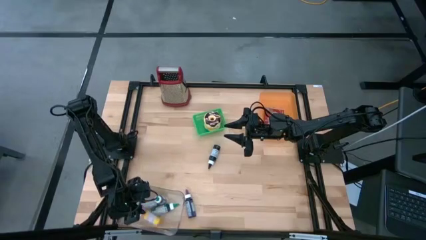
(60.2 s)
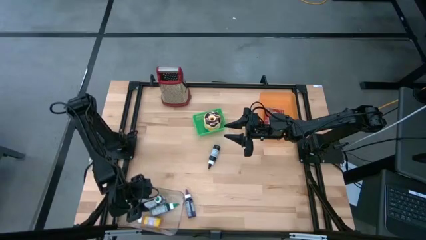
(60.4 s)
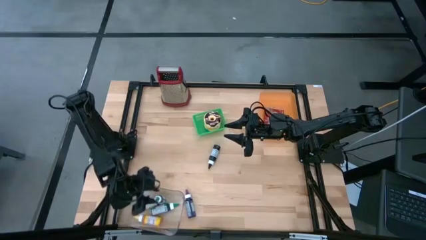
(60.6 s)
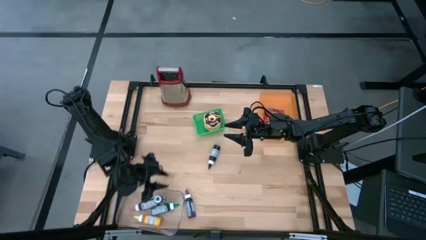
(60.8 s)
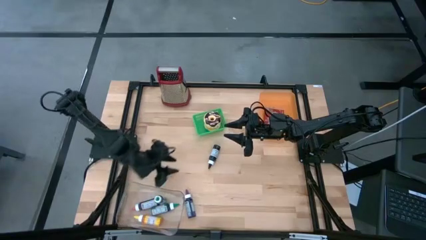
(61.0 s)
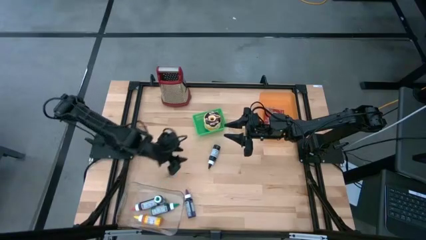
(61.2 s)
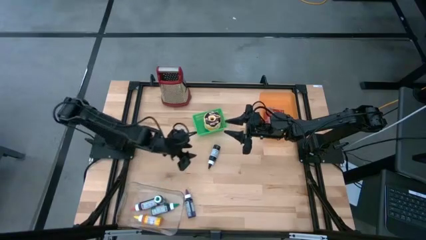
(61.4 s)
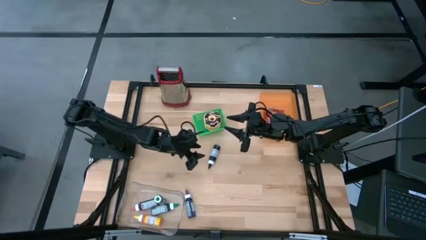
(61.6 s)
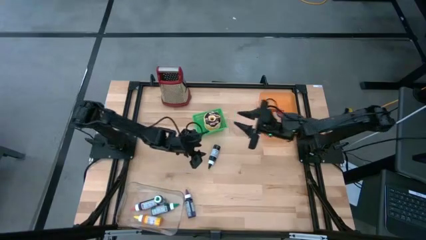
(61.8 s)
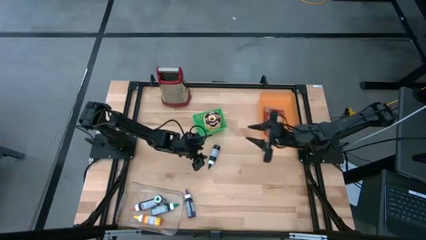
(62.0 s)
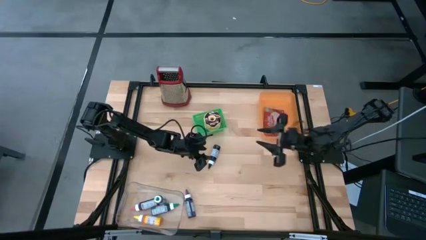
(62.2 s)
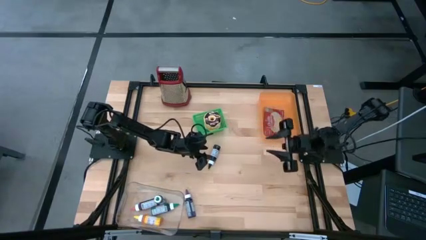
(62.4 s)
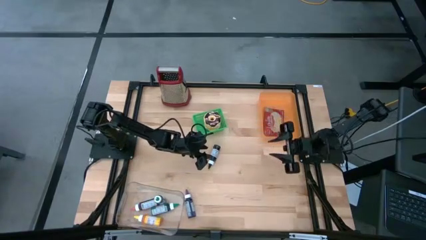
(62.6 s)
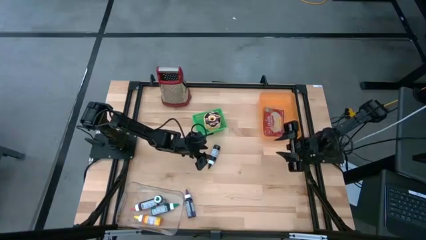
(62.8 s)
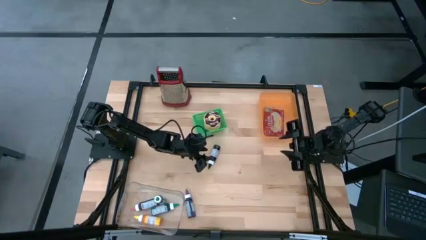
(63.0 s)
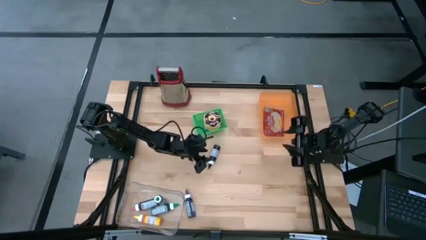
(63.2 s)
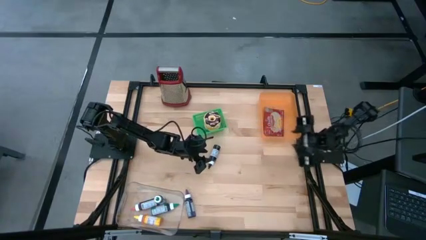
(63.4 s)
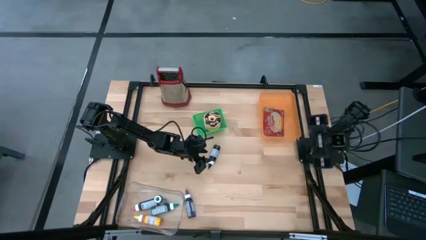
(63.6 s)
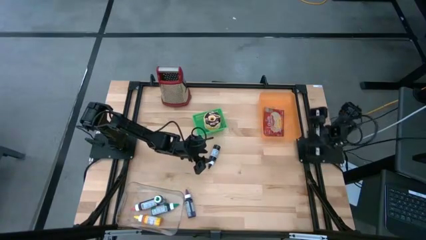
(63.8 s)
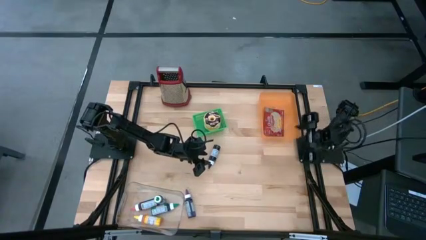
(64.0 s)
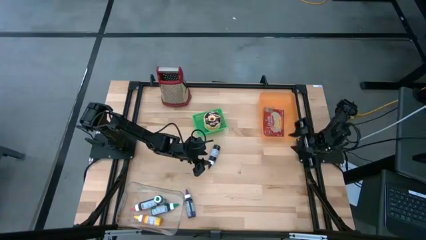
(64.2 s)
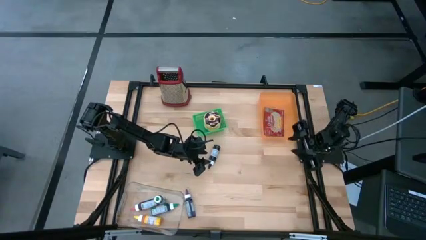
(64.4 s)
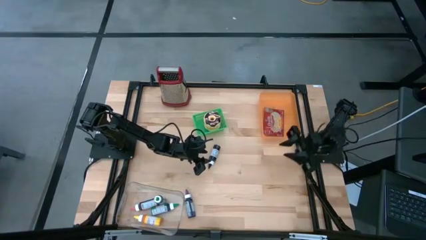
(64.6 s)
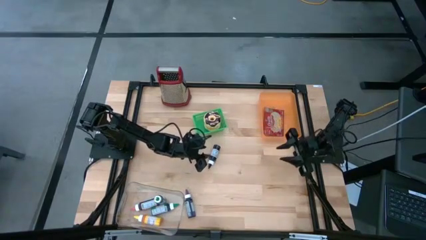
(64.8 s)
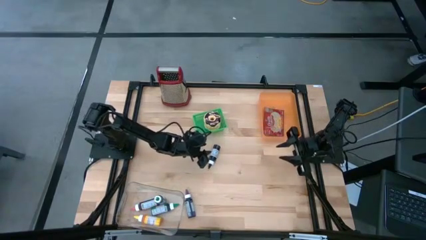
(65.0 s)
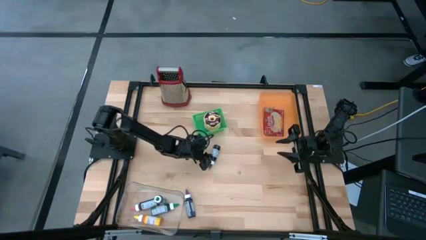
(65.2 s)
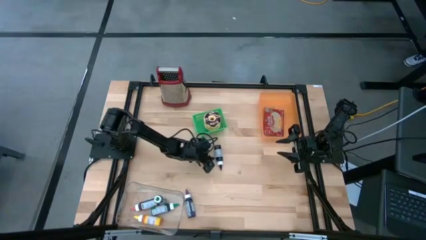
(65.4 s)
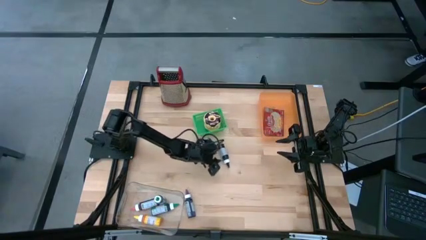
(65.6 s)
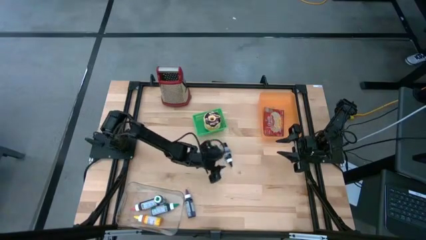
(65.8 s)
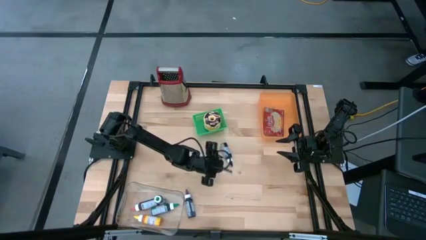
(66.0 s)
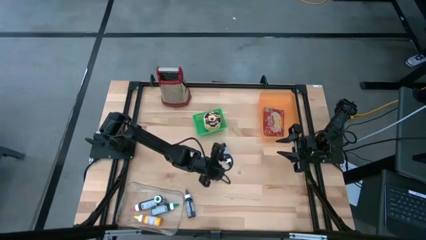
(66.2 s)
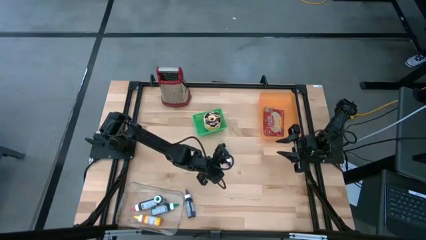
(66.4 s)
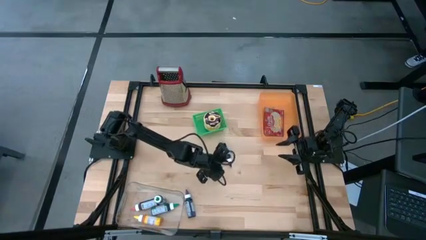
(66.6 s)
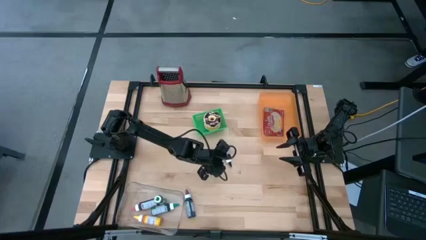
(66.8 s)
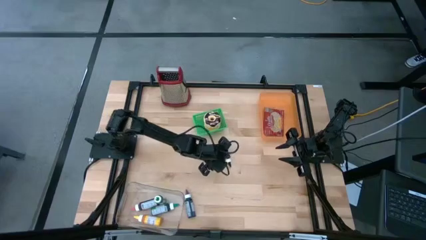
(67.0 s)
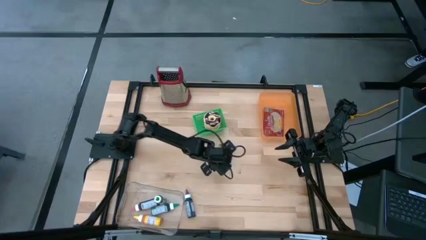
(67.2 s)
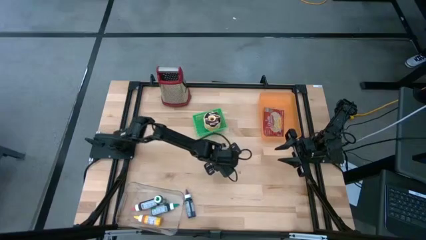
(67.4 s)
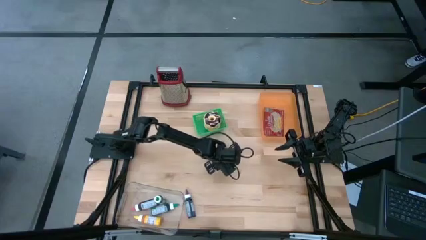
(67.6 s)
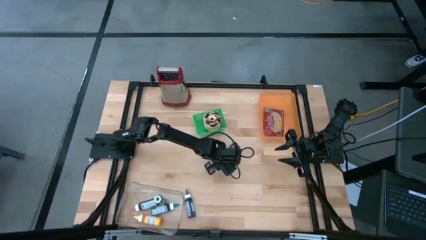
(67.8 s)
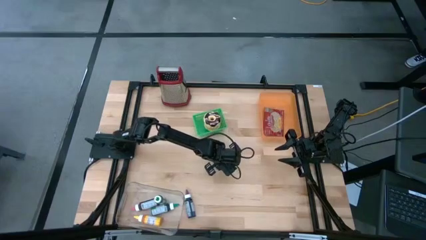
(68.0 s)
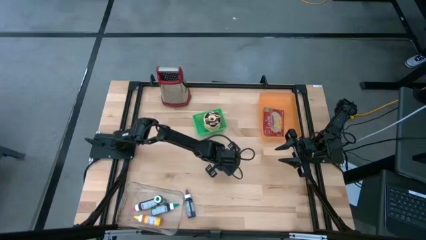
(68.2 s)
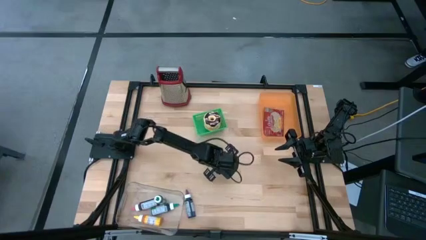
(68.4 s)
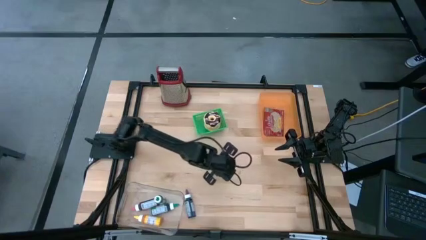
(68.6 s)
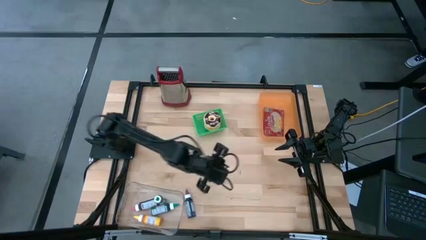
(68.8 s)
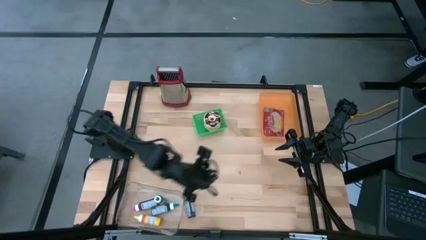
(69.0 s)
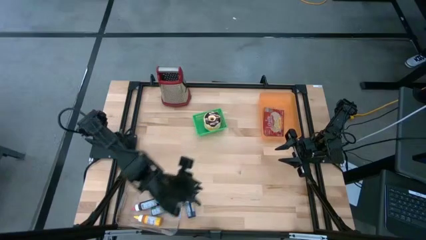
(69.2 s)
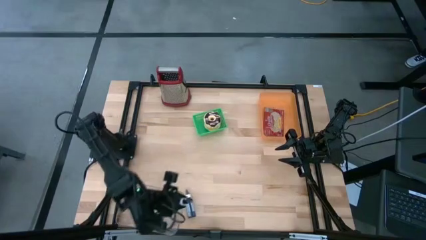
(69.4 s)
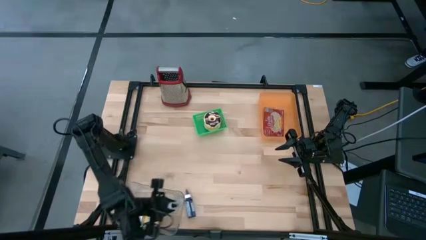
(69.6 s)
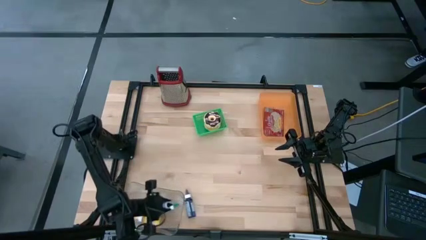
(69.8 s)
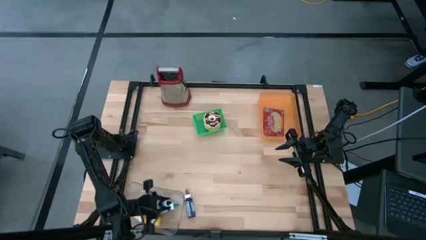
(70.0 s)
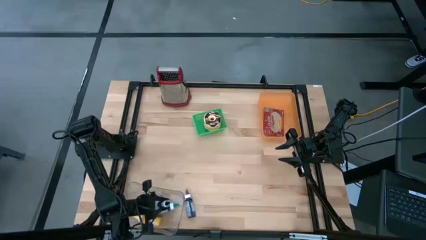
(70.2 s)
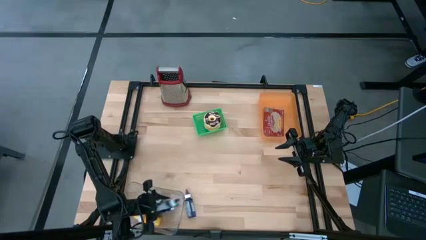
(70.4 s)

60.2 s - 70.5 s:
Put the black food coloring bottle into the transparent bin
